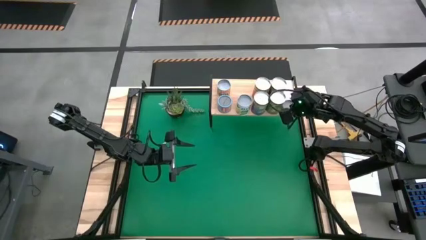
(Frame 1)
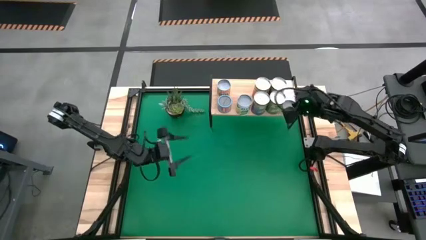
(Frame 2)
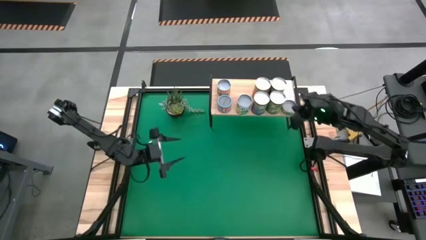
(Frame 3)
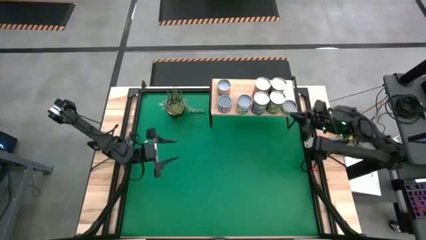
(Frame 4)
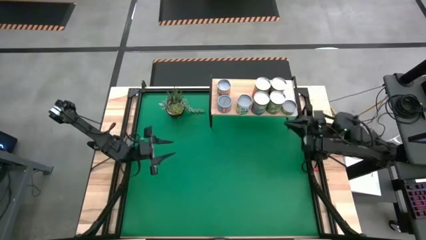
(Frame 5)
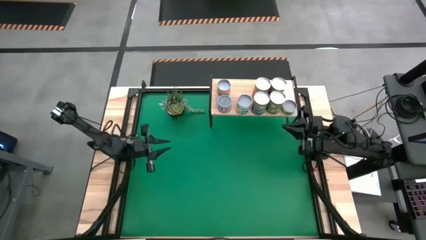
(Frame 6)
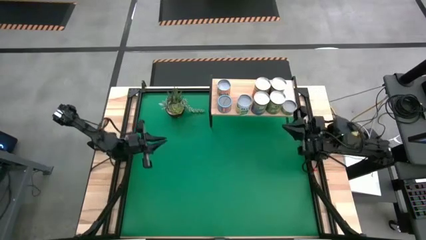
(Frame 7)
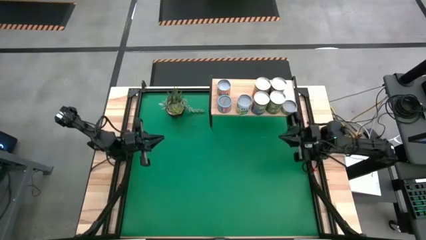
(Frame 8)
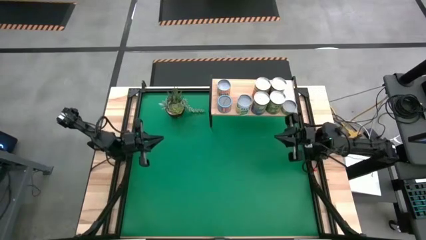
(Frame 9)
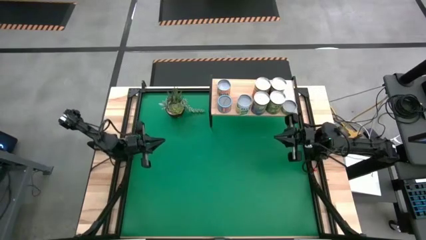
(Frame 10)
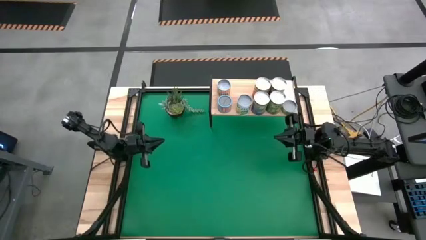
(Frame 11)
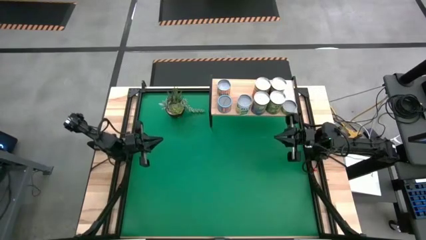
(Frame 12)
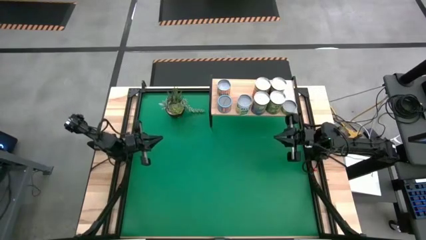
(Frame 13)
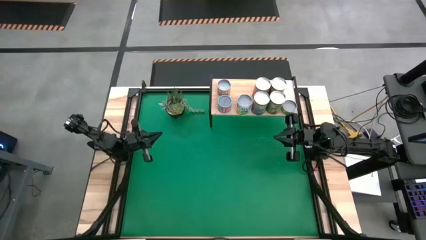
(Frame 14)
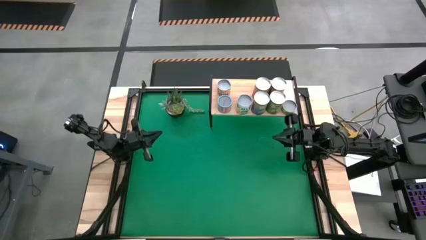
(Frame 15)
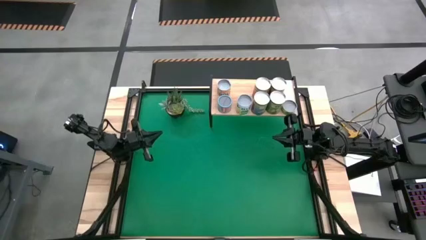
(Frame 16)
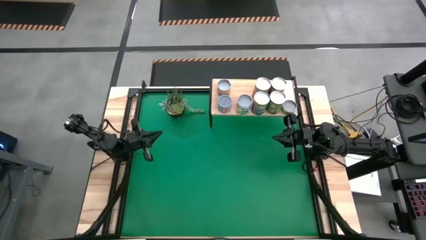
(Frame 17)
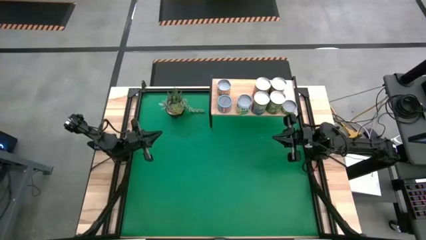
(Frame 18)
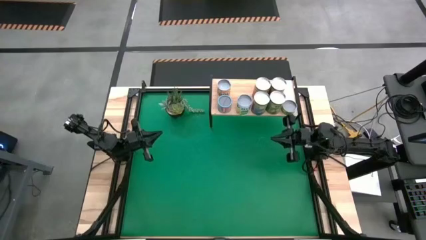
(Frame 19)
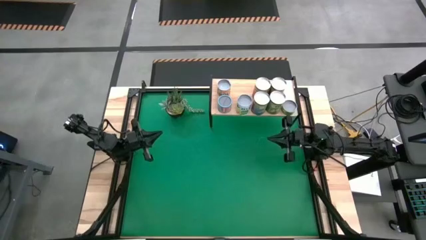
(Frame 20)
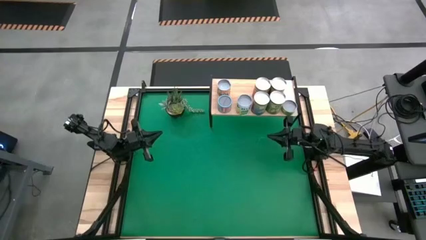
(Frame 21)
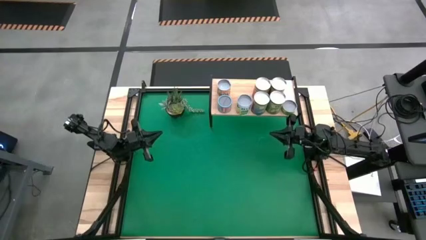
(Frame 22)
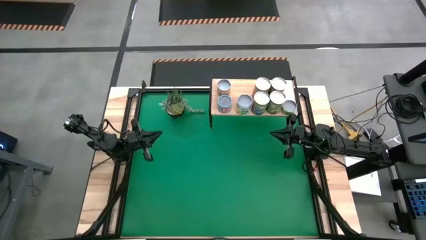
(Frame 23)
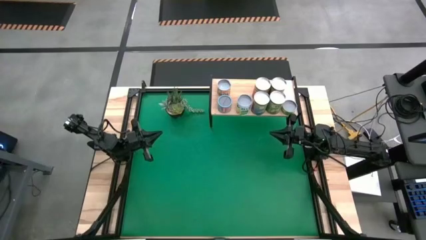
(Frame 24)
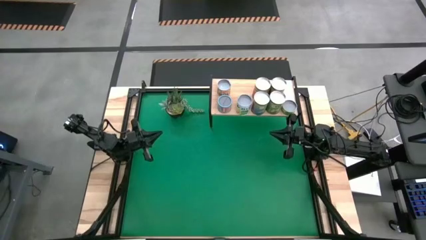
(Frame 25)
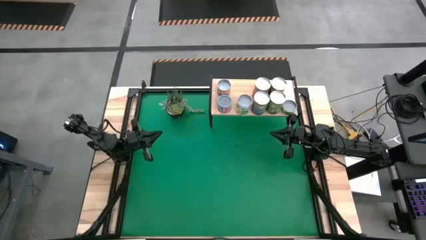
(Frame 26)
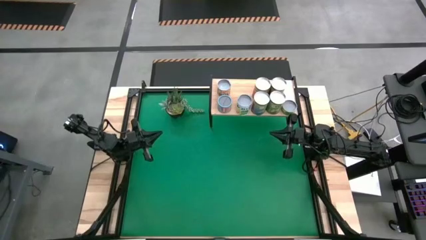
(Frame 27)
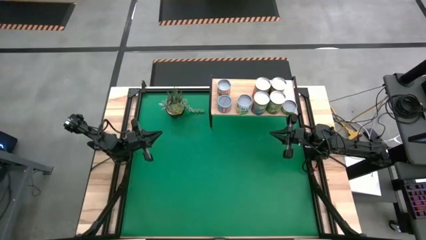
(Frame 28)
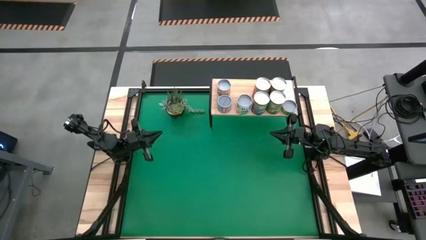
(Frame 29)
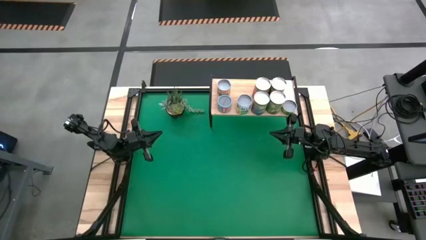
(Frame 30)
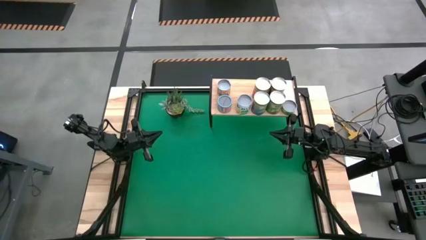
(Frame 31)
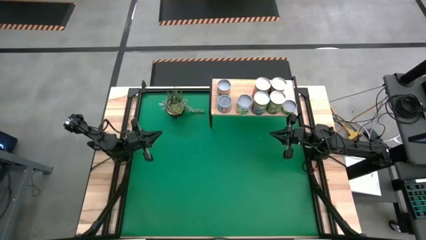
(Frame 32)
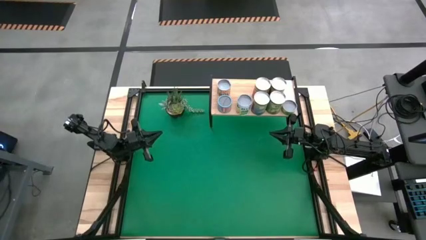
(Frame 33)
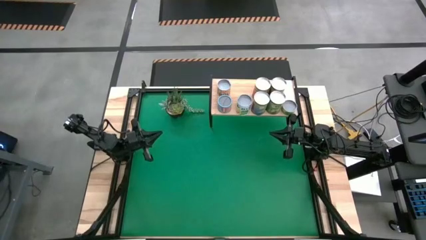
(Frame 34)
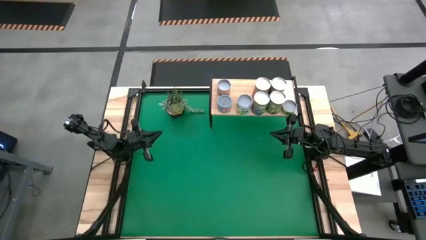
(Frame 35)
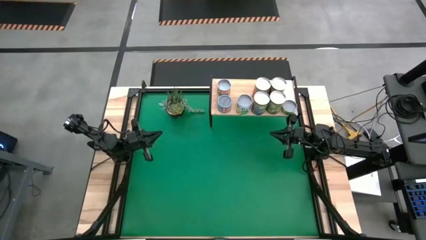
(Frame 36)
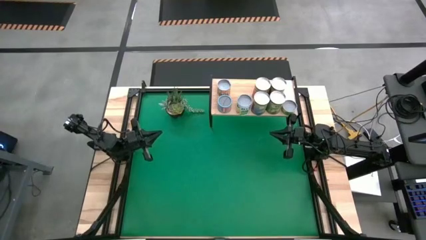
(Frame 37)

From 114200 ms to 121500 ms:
Task: Pick and place cans onto a shelf
Return to Home Position

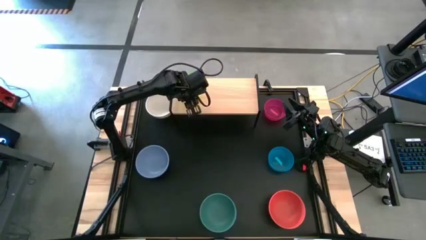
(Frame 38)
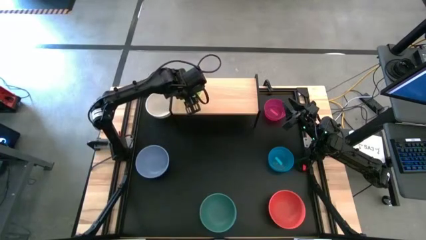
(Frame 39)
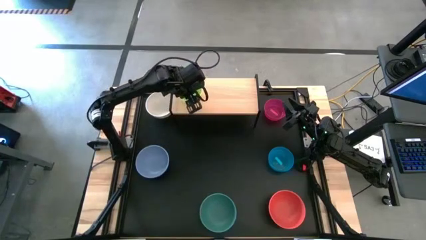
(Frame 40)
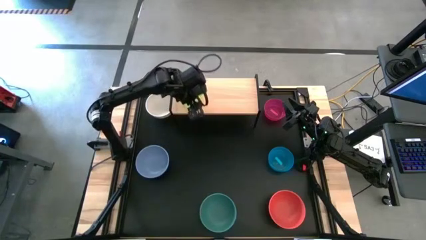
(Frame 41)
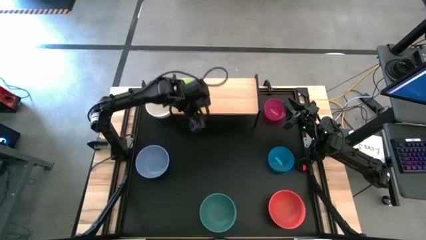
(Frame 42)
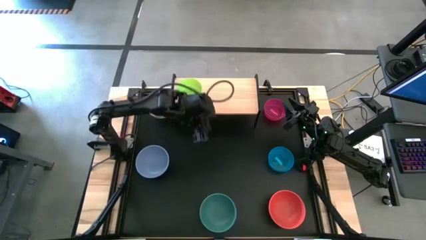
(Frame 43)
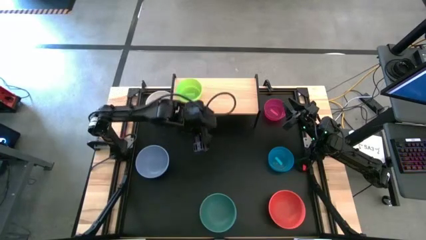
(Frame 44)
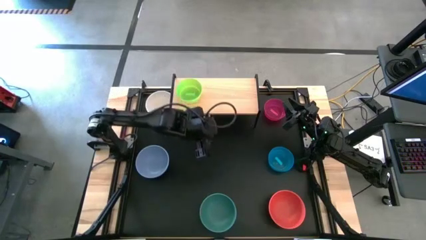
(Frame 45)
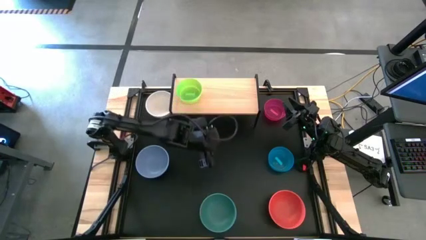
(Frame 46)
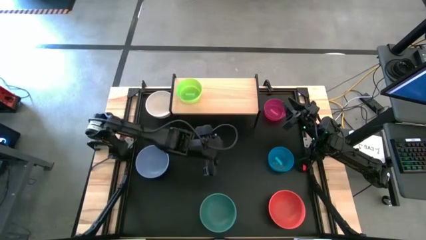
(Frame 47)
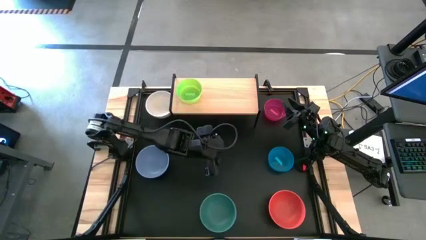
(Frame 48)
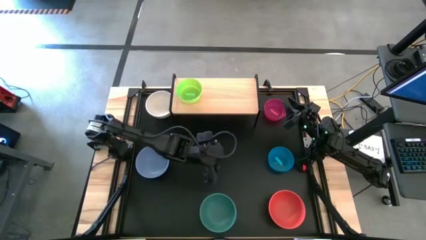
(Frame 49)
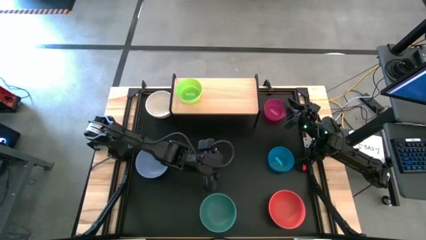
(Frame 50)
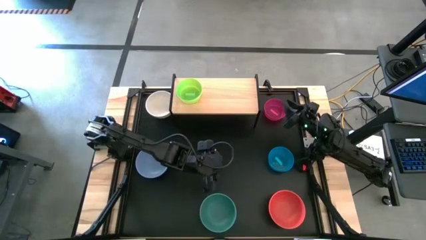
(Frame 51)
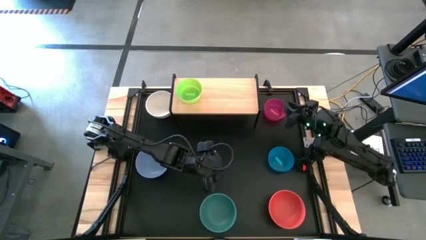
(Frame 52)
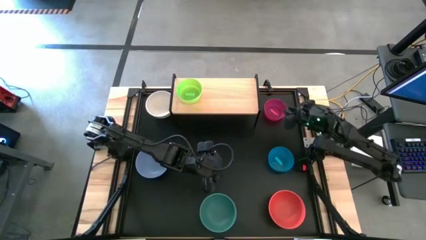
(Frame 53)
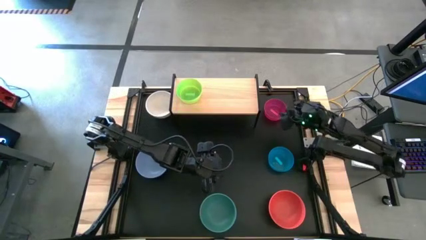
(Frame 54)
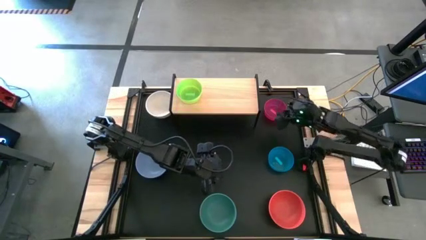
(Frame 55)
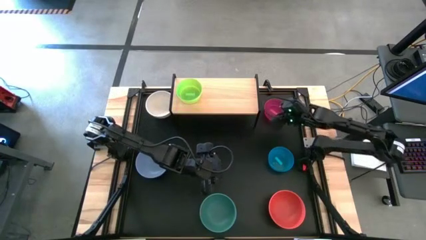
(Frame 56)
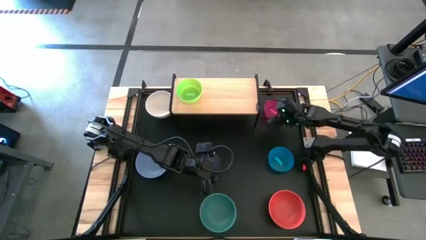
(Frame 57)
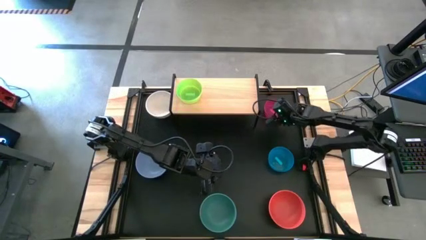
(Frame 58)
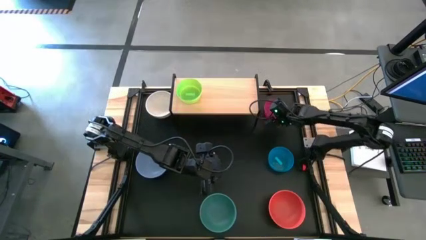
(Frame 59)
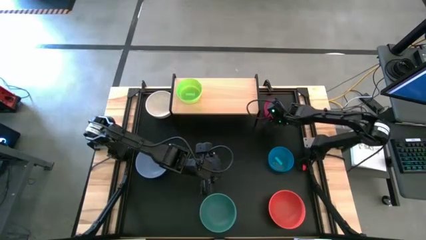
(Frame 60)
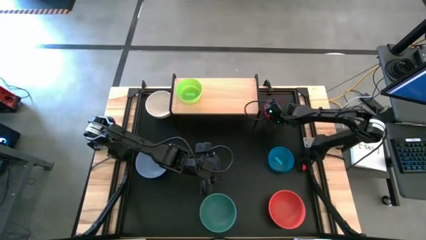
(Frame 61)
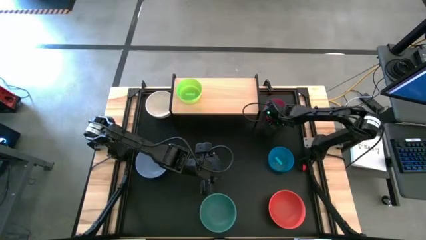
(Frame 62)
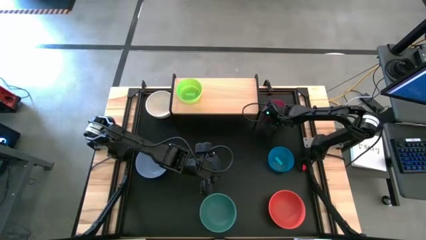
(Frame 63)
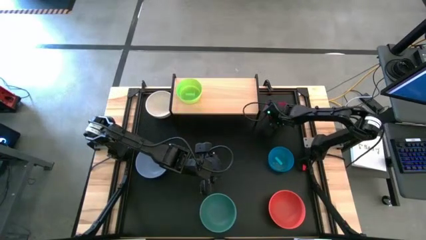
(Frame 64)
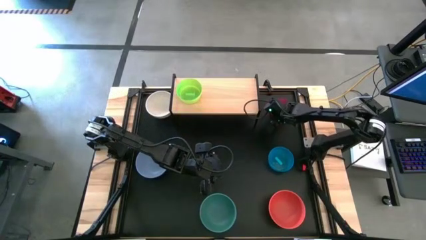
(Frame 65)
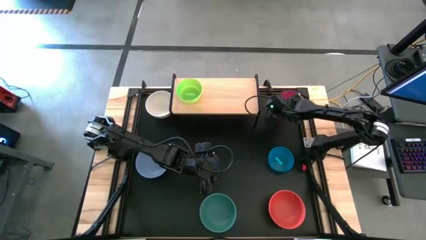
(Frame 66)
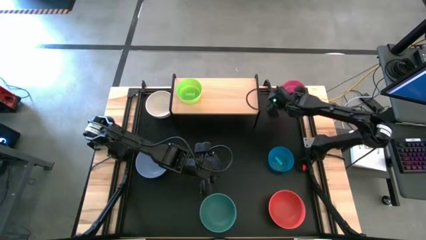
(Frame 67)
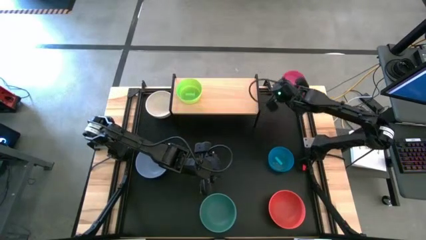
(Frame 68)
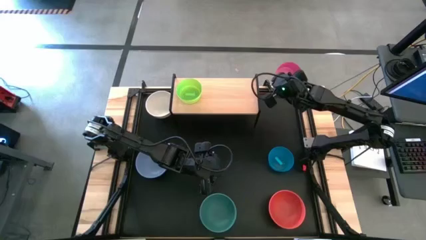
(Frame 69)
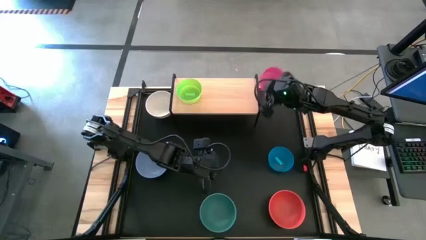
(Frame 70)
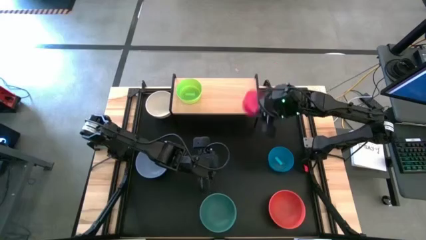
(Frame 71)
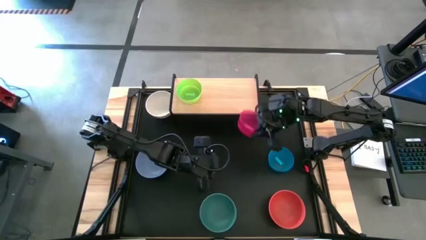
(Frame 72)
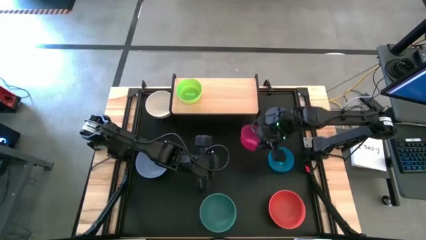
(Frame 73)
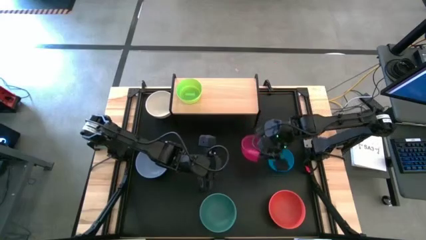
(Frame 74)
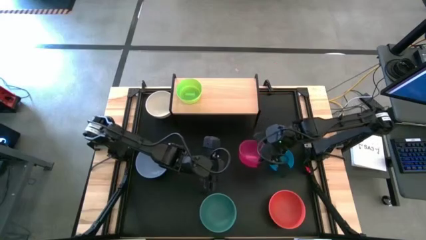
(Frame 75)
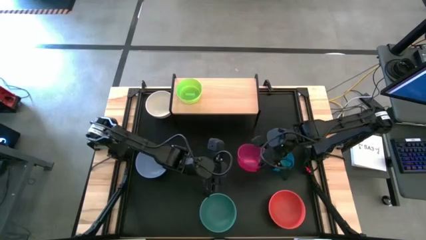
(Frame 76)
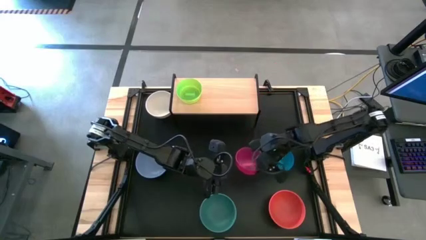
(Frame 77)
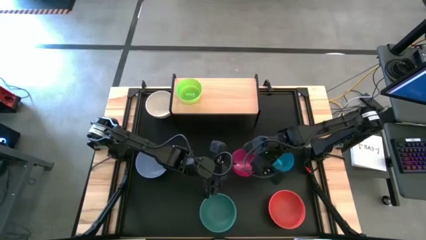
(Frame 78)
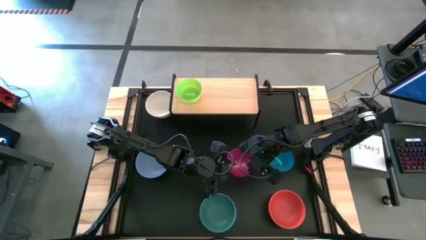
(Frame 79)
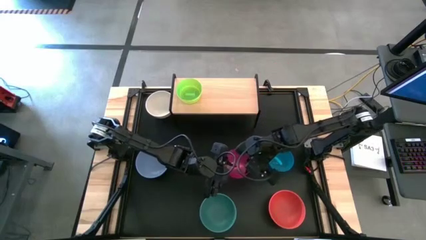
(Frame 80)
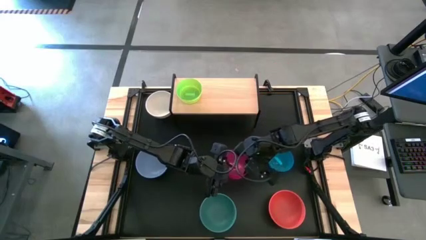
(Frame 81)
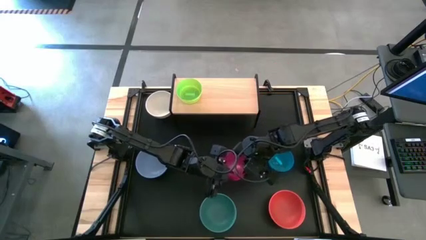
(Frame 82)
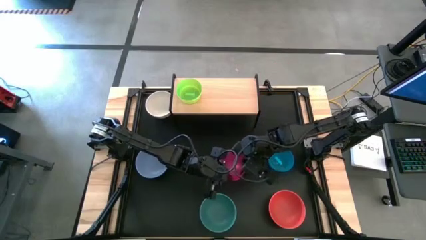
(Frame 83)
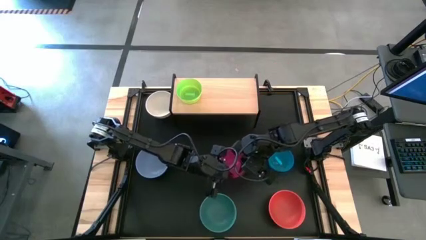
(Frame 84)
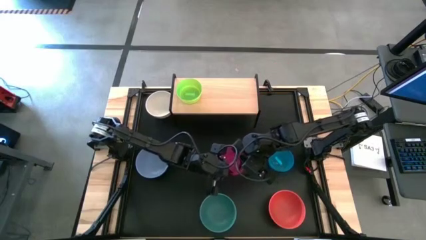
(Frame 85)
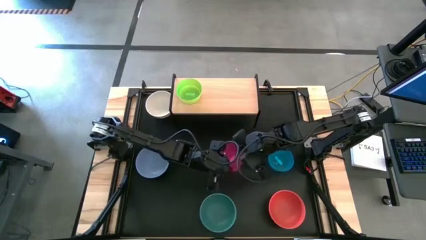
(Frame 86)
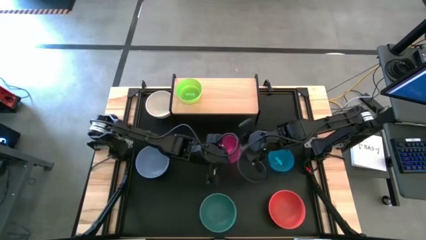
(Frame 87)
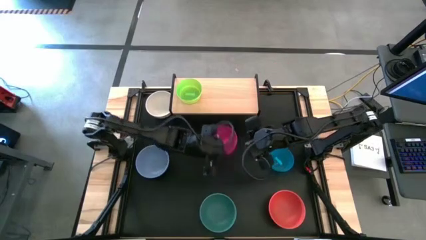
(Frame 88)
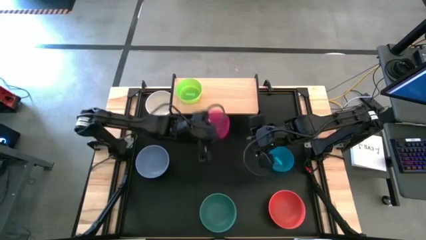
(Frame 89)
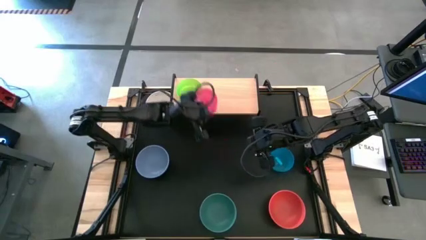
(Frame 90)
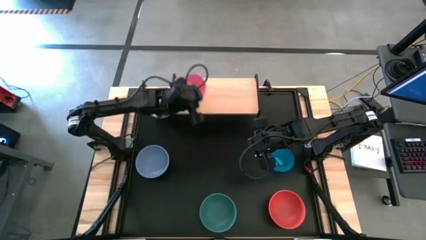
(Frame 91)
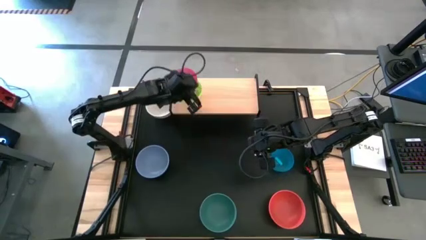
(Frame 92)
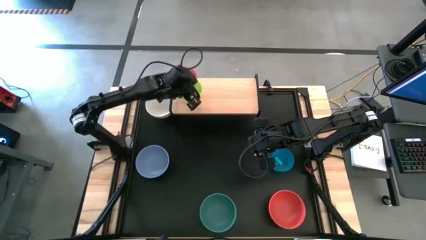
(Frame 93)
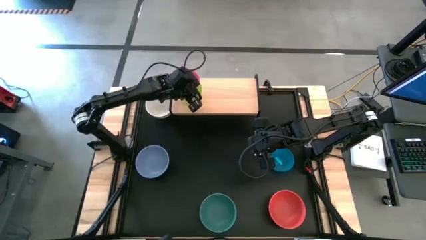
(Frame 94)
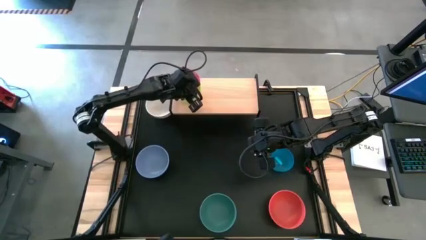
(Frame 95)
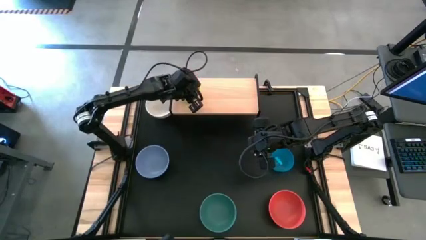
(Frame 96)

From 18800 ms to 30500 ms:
Task: Place and stack bowls onto a shelf
Stack the small red bowl on top of the small green bowl on the shelf
